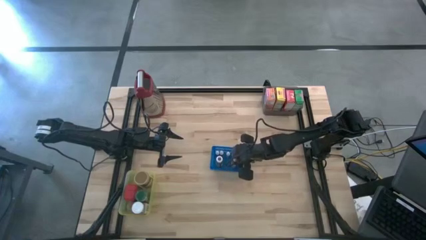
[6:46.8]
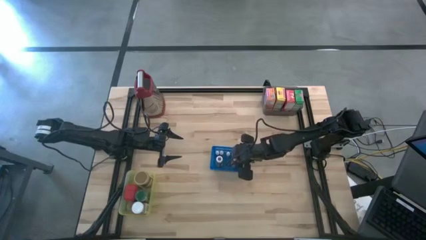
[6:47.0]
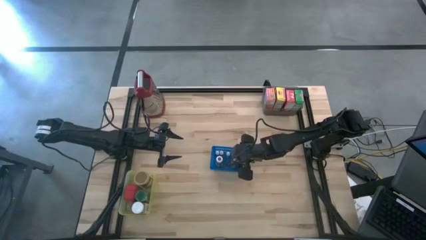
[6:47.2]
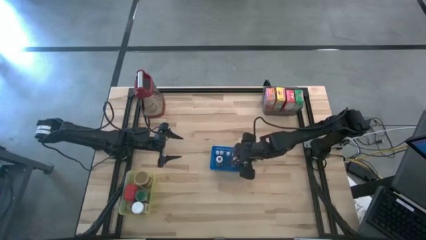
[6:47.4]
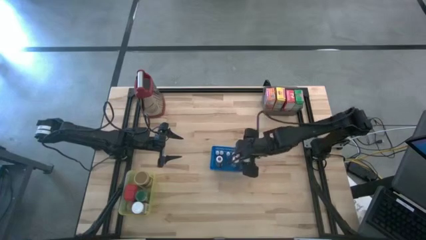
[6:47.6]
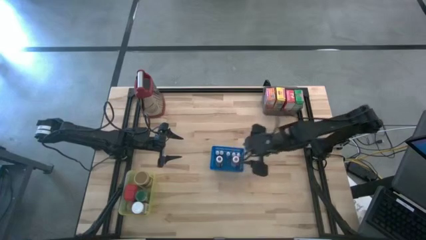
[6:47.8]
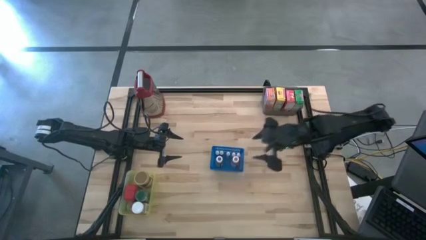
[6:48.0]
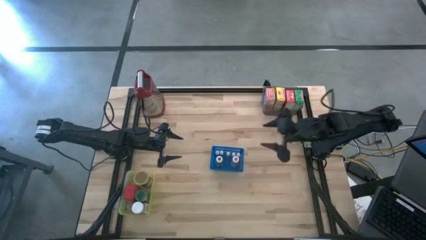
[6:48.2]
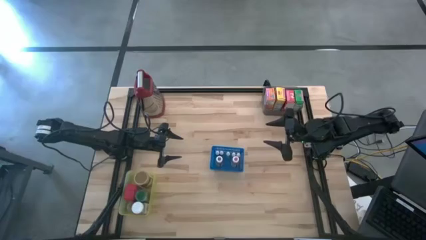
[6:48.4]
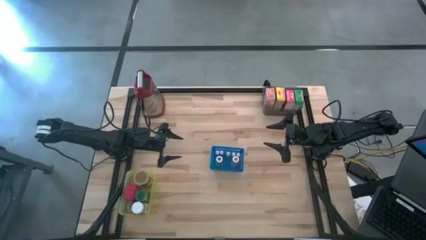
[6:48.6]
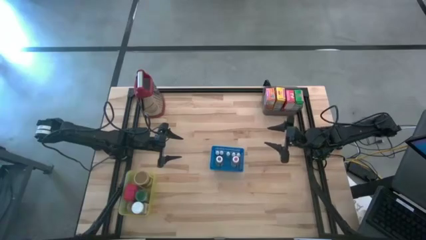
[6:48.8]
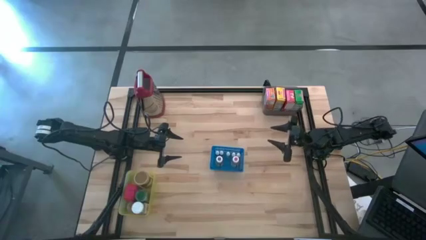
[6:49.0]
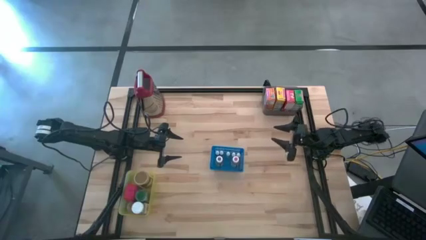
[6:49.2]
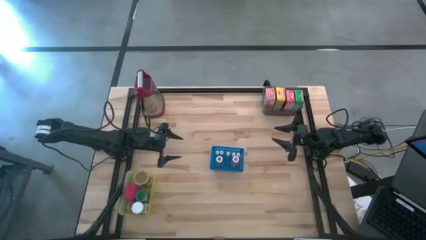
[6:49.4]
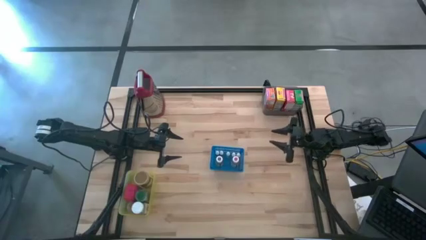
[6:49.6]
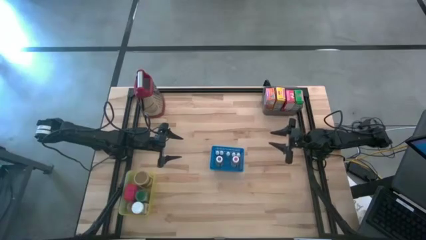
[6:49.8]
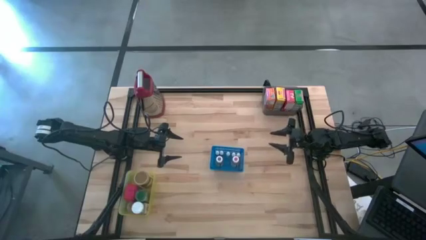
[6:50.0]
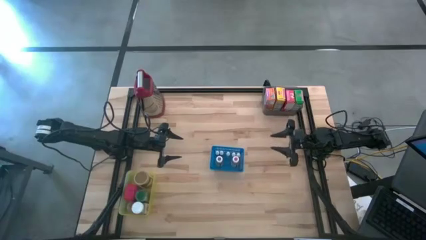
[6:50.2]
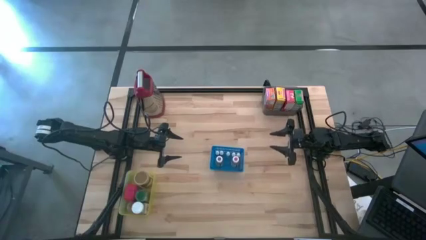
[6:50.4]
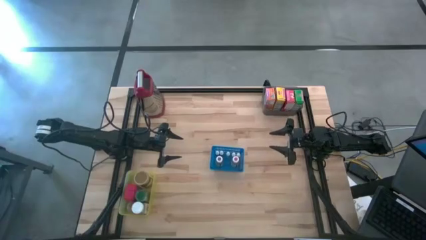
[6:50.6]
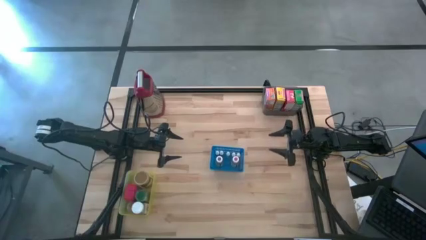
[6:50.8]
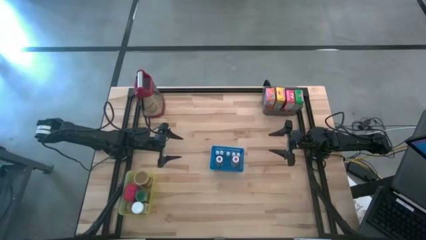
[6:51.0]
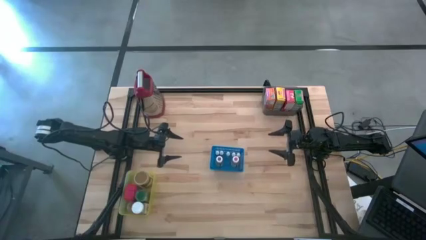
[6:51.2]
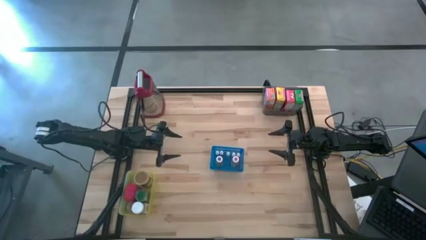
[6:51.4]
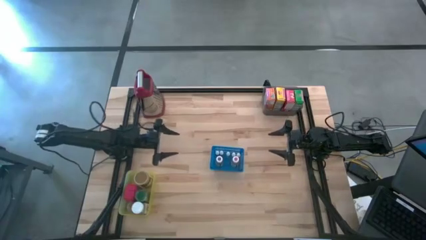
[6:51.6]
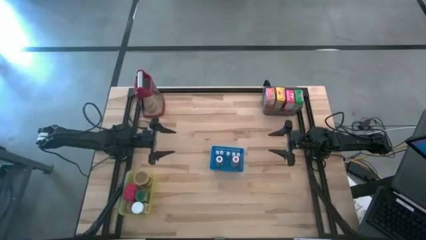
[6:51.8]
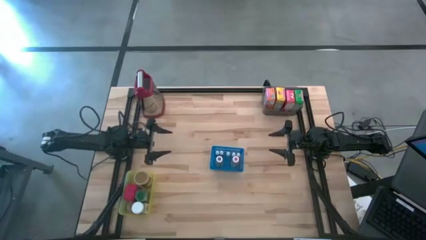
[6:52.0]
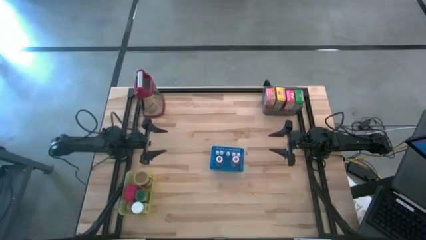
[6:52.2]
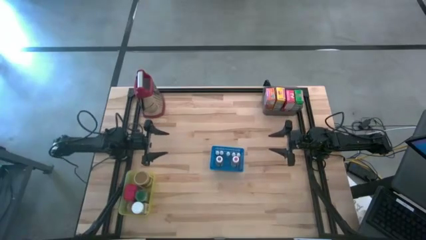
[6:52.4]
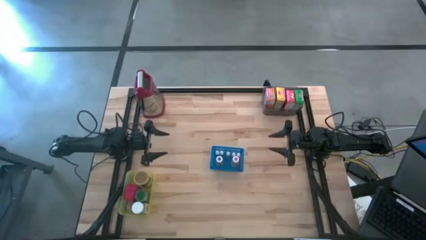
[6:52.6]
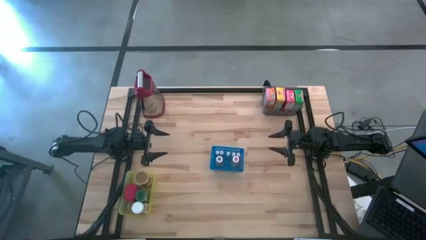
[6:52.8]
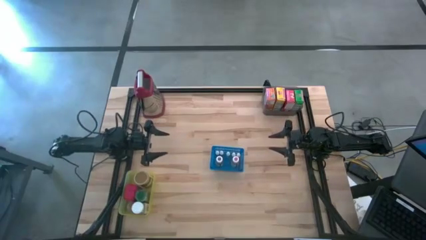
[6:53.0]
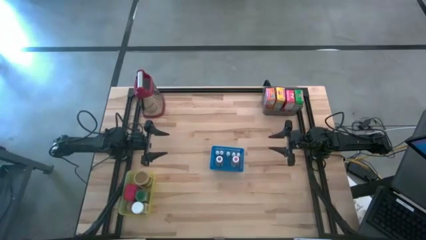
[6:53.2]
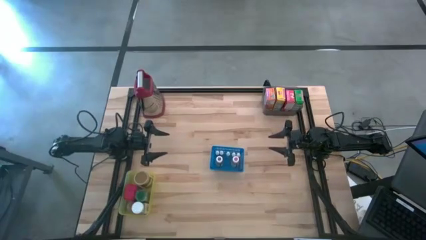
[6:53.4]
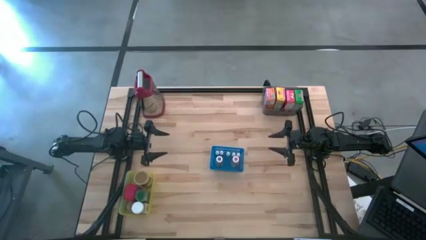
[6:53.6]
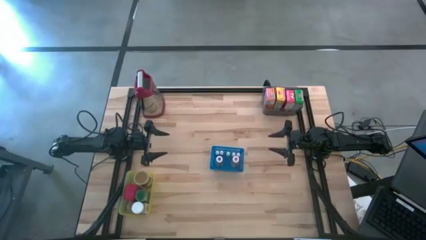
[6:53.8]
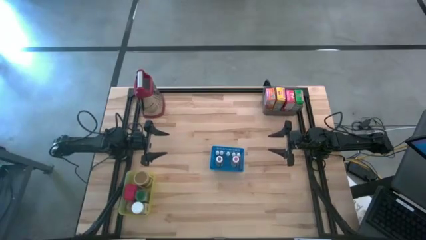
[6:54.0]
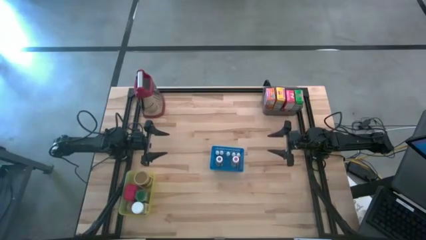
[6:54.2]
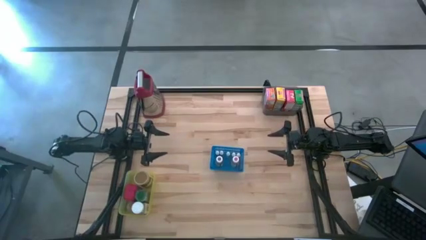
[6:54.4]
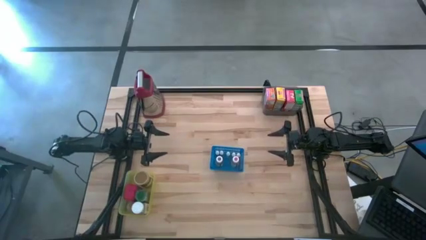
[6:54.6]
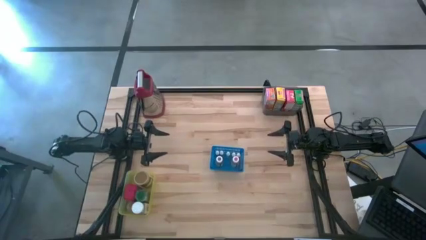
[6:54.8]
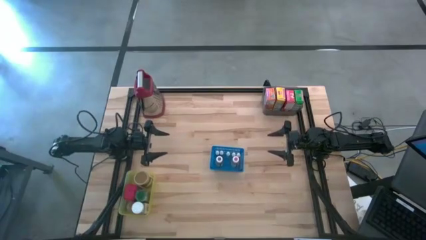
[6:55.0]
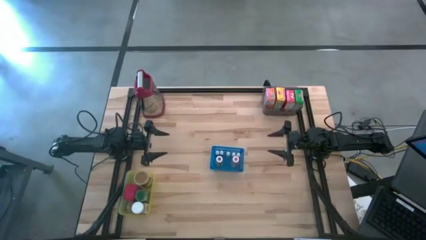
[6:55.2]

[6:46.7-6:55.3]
Task: Pick & Place Kitchen Items
Return to Home Position
